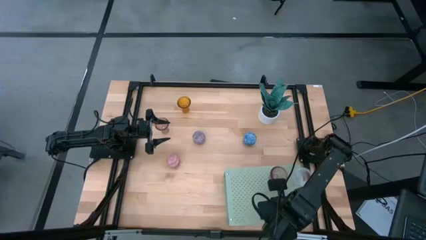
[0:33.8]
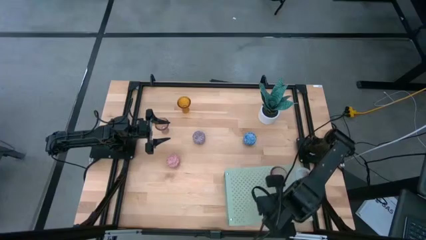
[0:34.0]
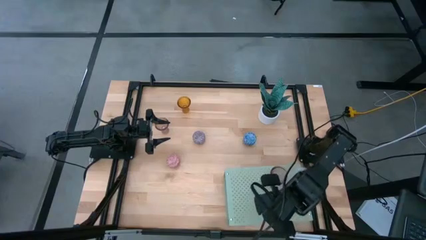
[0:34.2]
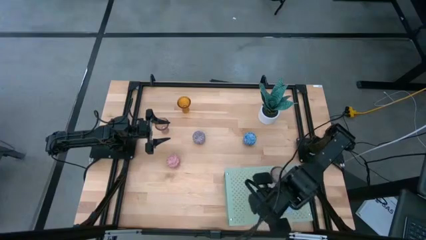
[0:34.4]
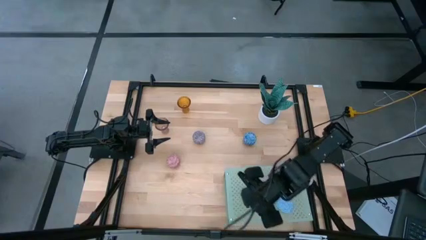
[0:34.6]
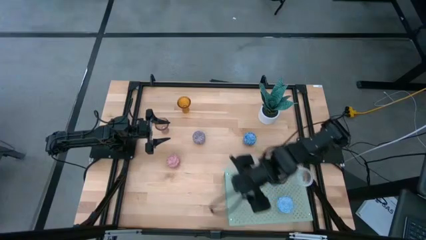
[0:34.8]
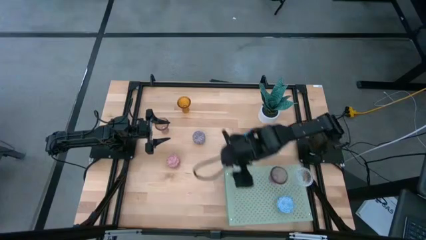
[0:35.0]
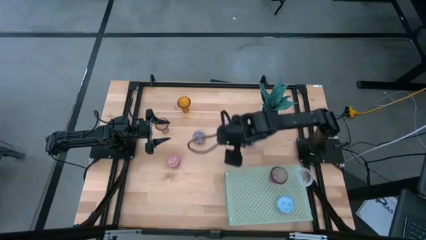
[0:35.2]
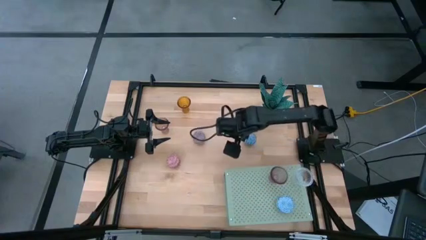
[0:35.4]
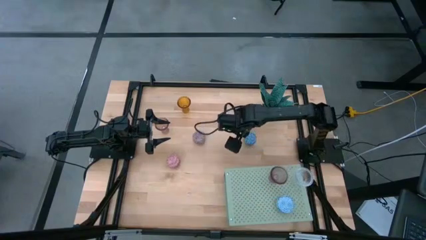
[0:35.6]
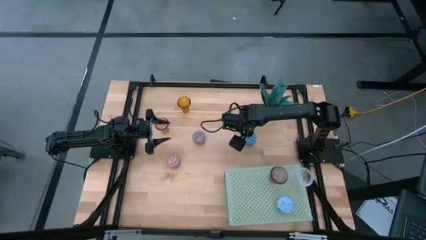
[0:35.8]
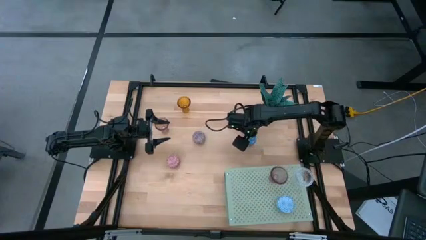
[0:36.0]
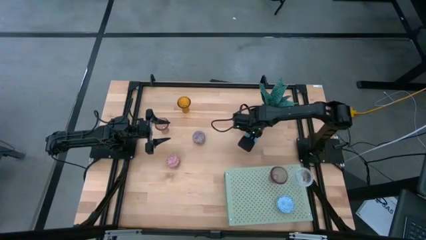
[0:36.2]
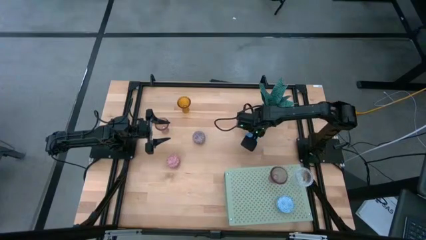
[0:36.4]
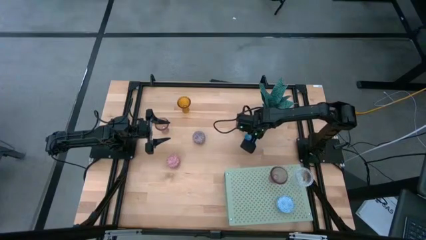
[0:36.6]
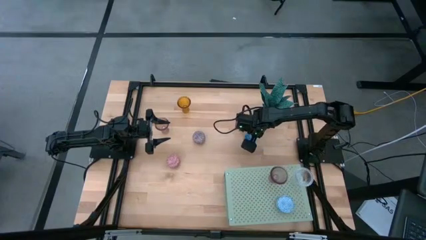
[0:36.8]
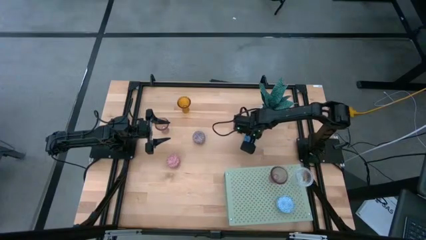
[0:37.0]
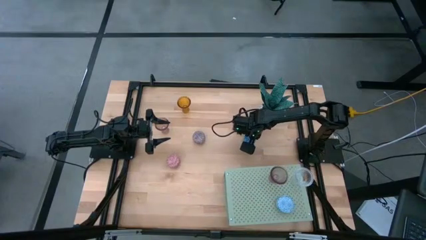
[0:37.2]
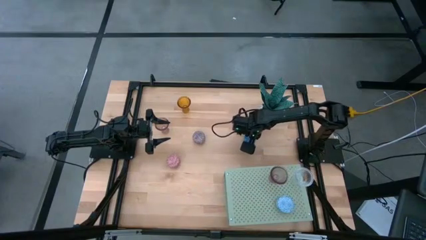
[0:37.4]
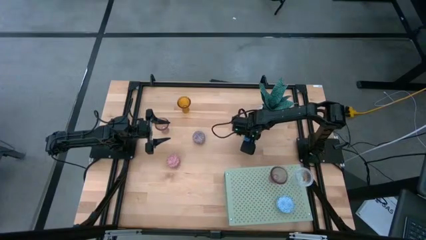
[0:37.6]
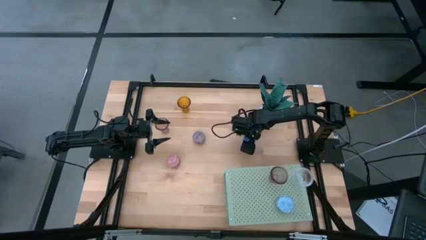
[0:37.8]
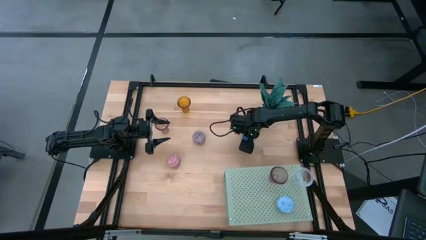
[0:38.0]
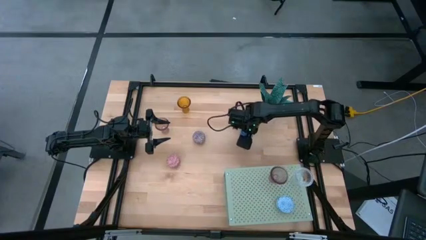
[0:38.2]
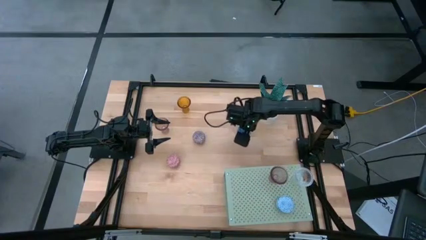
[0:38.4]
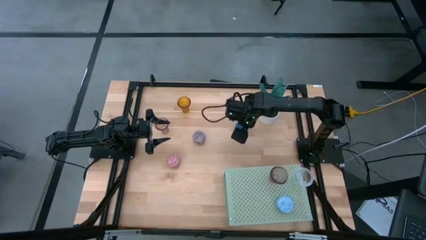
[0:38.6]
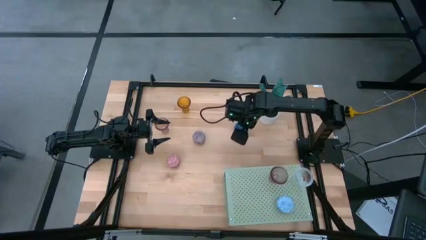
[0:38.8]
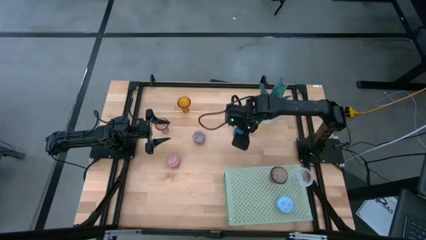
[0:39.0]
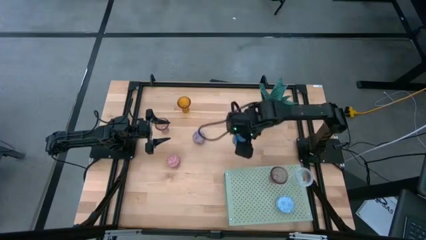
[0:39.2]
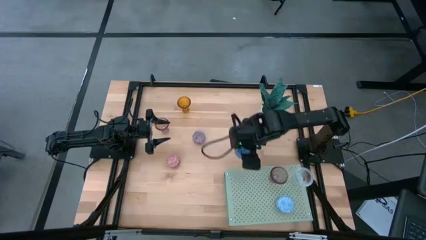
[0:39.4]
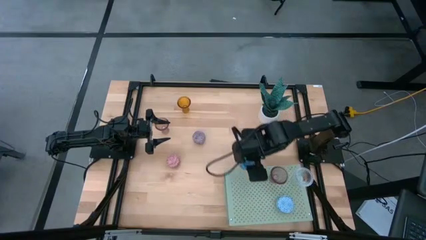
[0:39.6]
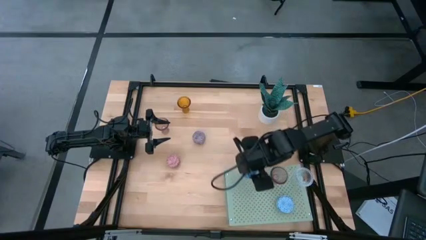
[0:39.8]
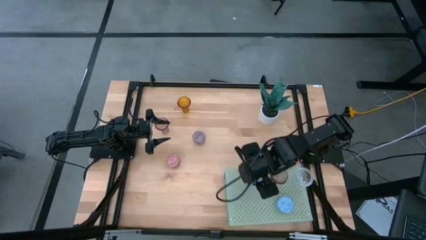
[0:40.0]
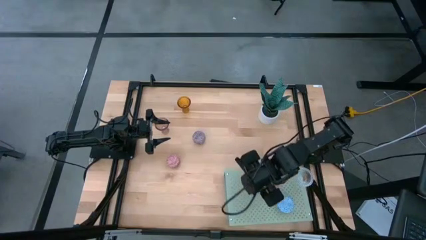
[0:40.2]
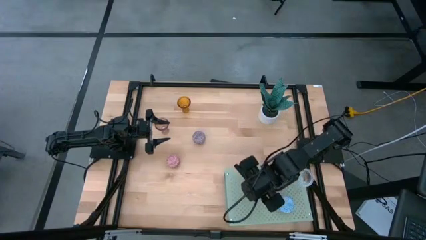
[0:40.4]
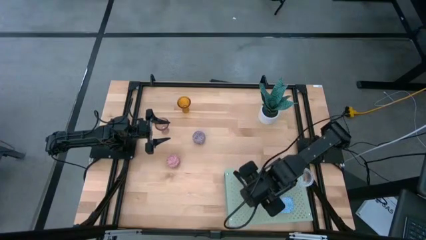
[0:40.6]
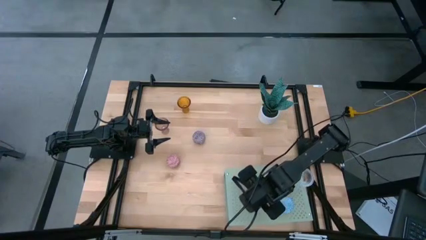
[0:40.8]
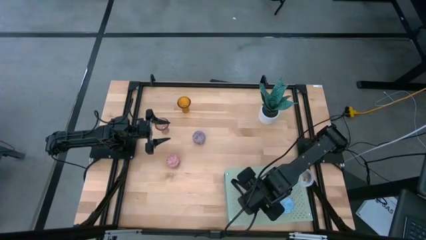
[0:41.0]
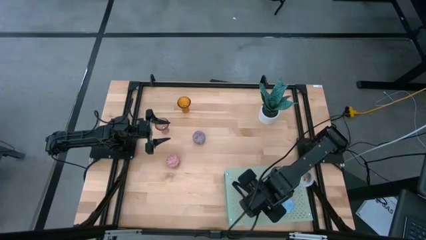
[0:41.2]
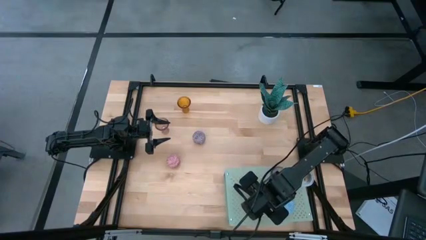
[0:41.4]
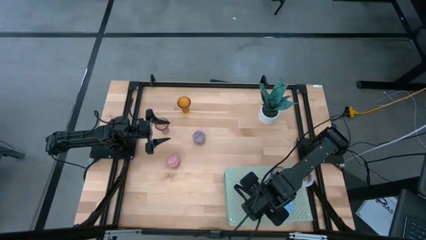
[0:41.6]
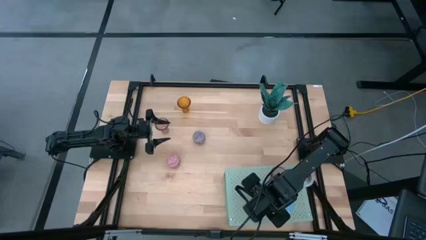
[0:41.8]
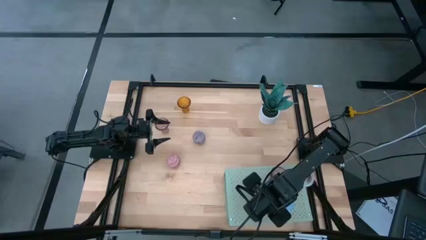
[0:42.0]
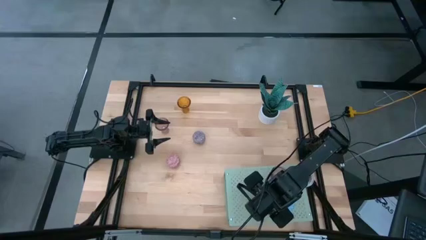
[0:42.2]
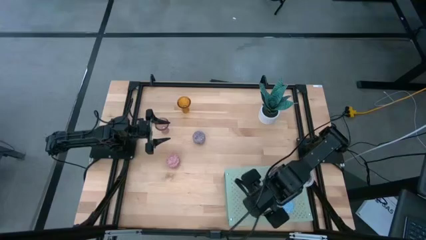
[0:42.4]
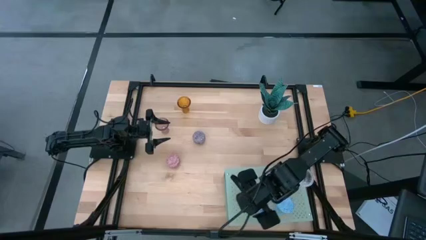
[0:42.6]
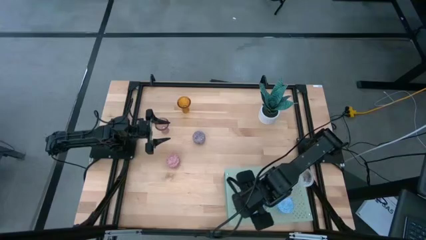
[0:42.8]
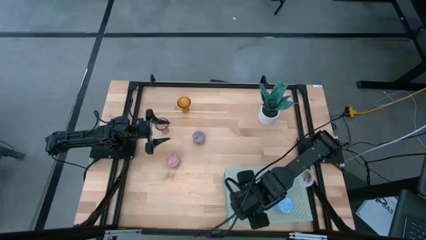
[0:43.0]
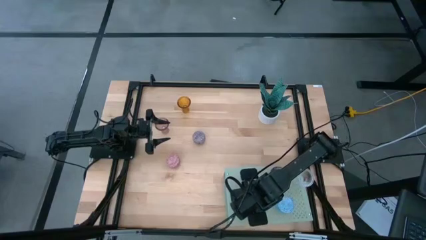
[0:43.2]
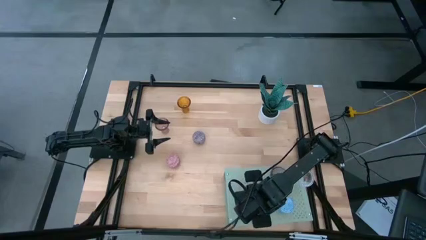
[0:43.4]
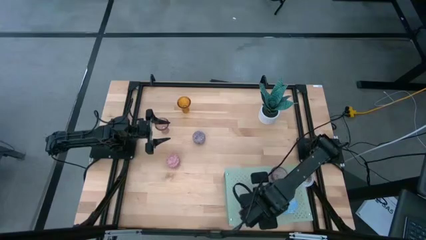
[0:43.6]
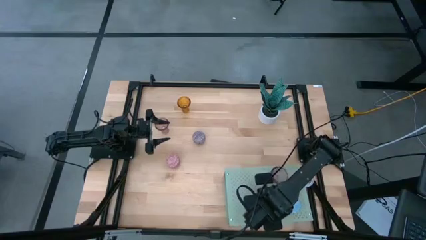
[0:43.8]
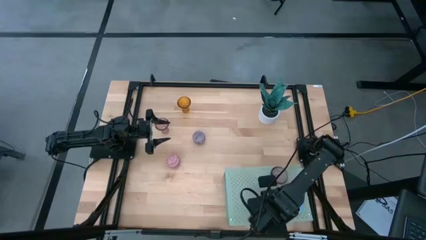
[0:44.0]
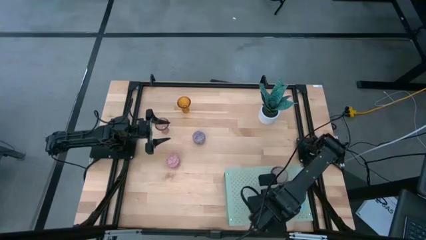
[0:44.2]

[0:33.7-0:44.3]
Task: Pick & Place candle stick holders
Put the dark blue scented candle on the shelf

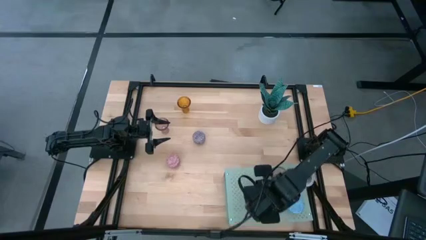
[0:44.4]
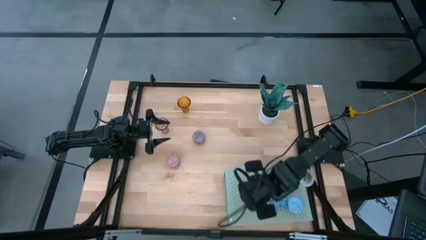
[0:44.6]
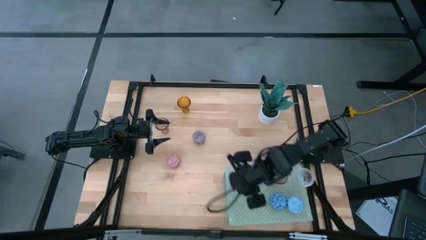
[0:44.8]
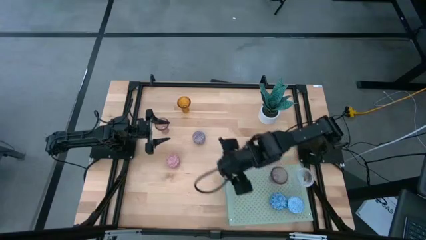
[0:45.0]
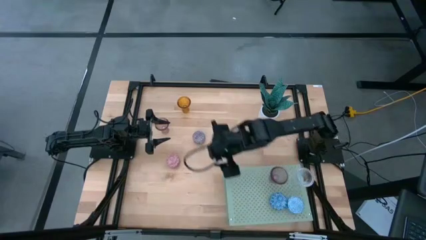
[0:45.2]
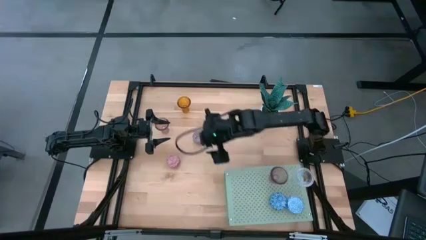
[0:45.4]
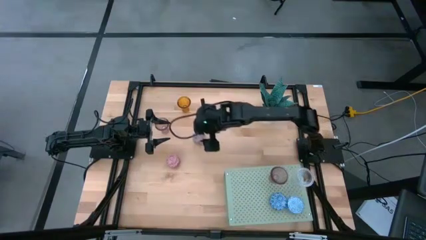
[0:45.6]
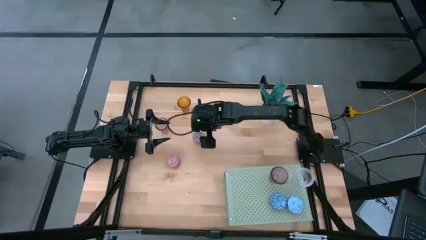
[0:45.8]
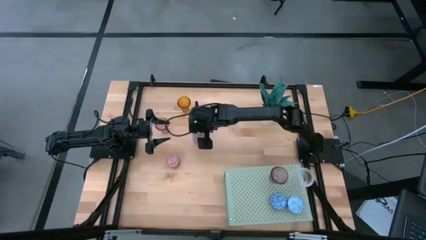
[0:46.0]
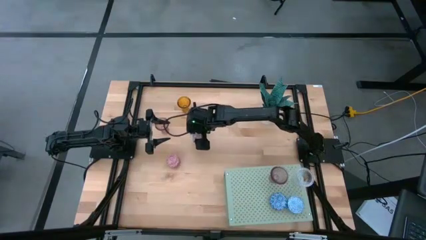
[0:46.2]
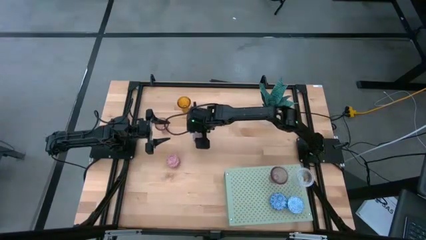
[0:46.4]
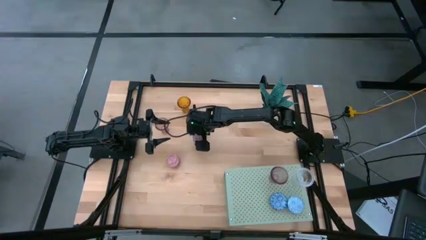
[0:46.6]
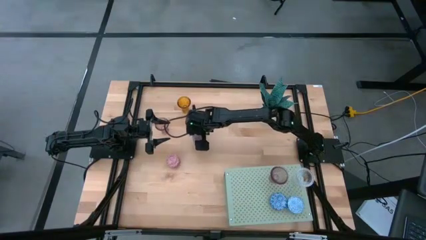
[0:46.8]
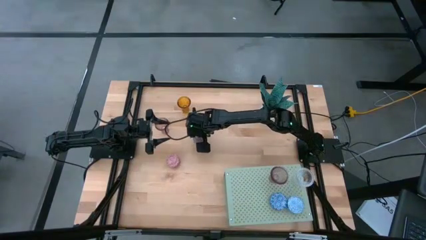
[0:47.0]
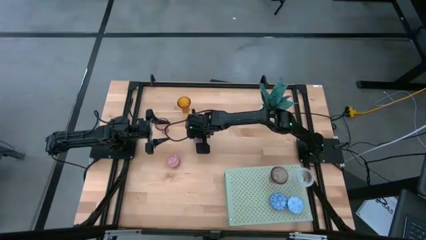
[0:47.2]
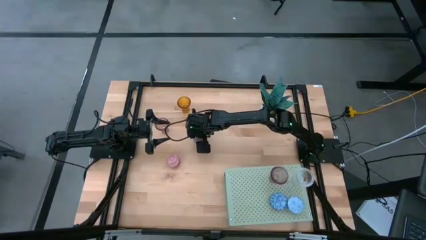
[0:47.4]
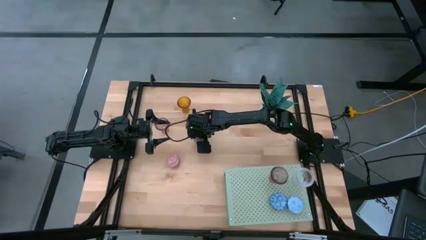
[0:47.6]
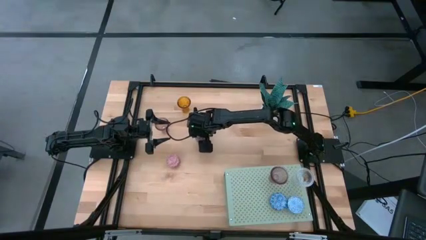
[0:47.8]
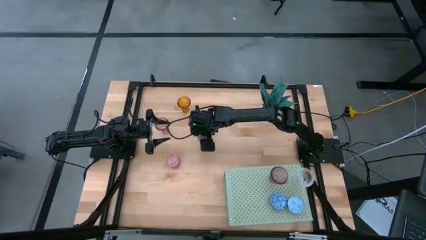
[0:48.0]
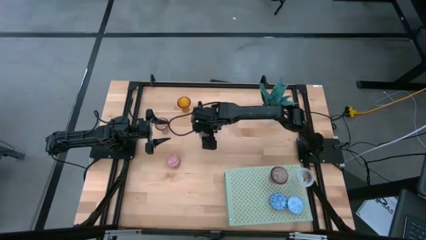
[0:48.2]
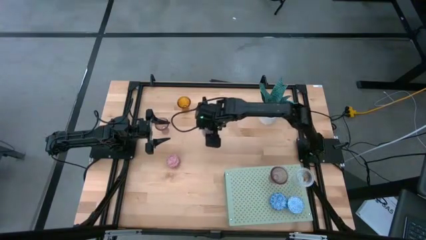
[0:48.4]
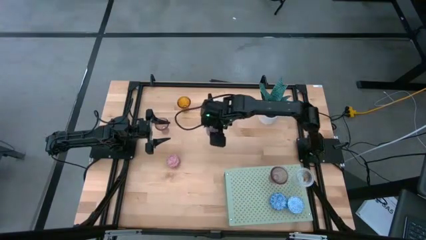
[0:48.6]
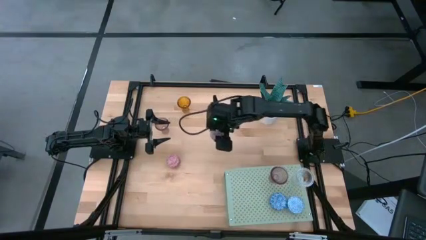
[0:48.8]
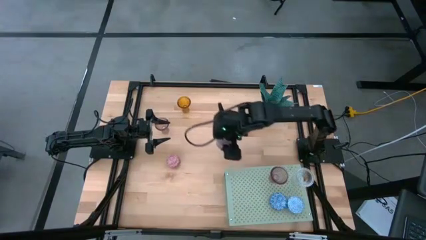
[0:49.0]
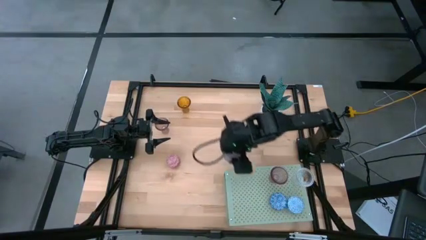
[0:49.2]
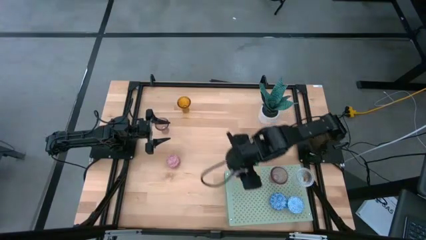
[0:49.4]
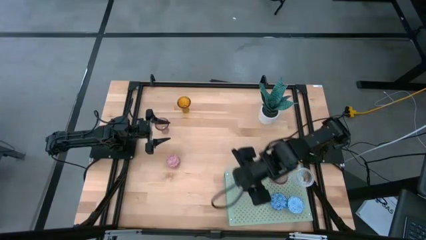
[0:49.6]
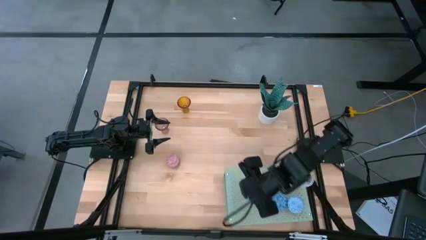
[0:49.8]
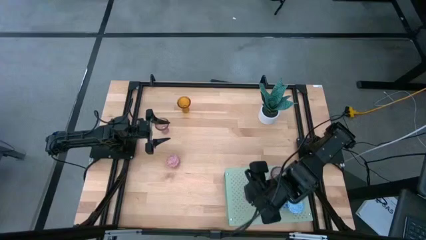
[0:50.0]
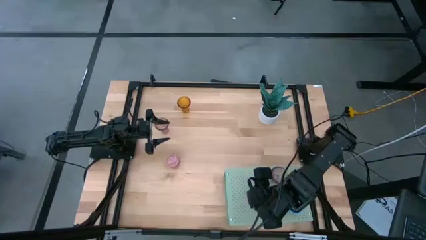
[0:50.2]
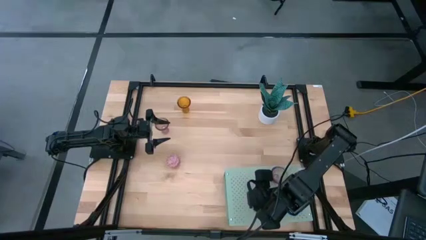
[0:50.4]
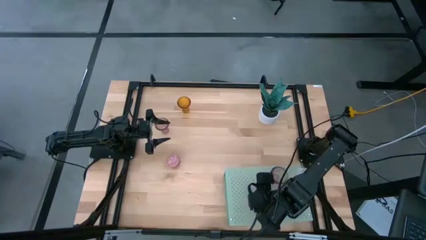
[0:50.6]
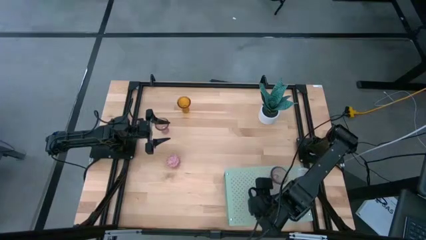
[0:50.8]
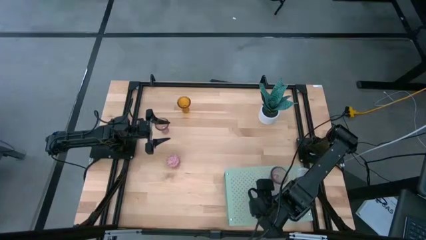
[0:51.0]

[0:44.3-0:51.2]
Put the red scented candle on the shelf

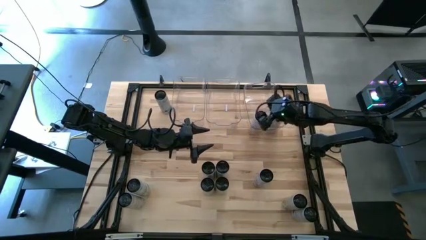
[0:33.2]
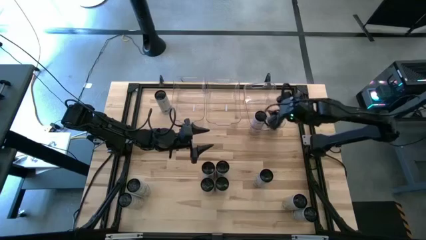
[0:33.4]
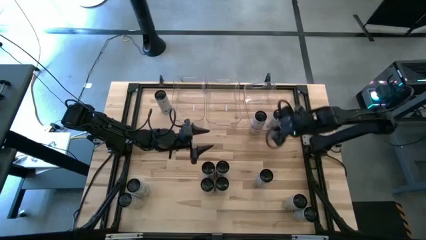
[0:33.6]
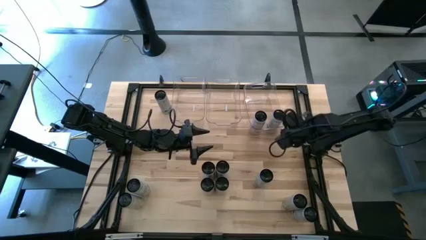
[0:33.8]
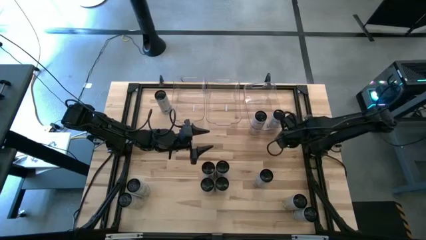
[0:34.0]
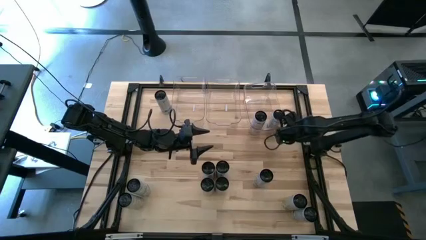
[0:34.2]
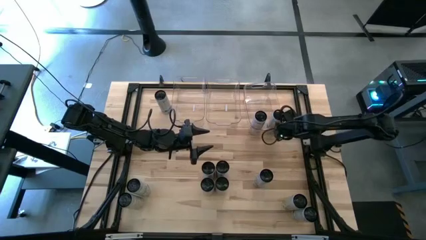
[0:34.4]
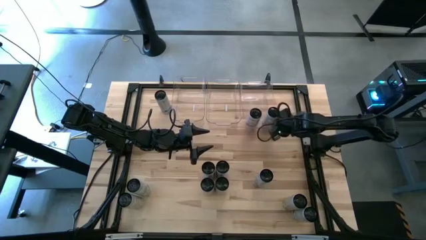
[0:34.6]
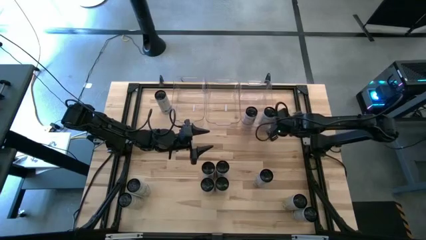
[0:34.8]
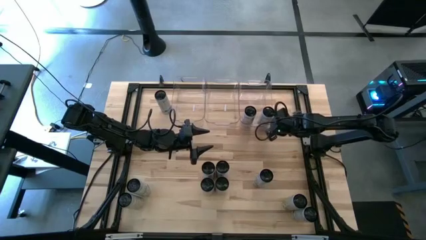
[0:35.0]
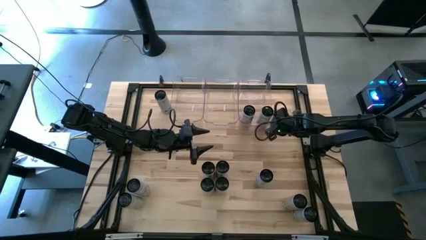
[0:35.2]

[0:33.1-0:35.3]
Task: Sort soda cans
Adjust the right transparent bin on the table
